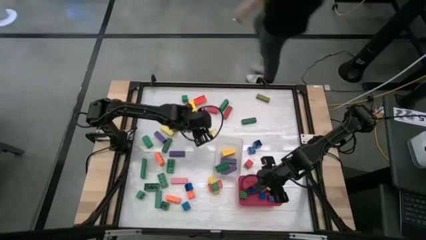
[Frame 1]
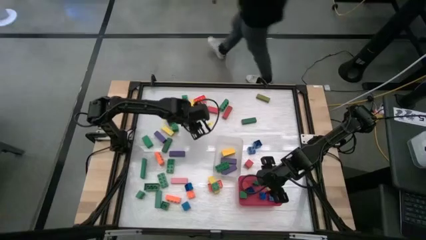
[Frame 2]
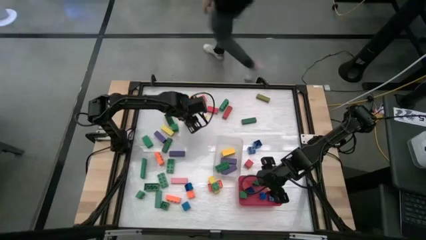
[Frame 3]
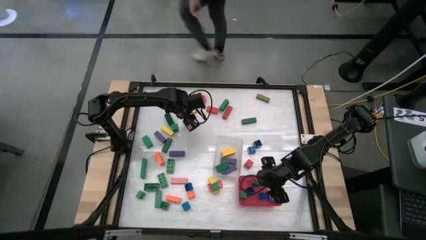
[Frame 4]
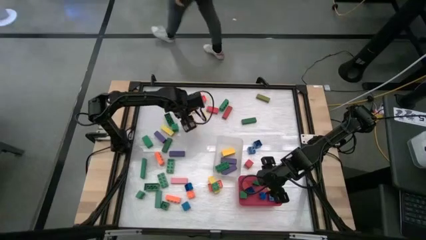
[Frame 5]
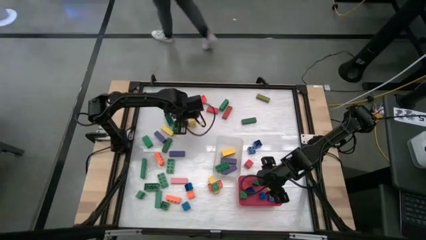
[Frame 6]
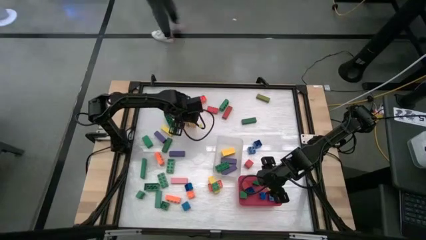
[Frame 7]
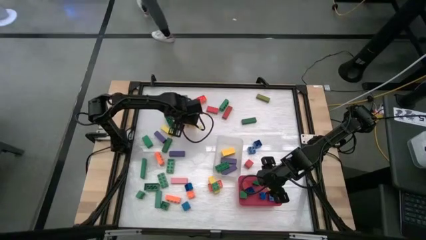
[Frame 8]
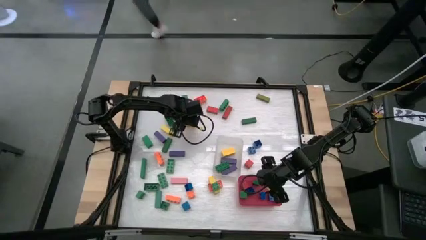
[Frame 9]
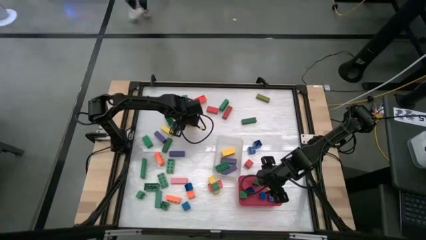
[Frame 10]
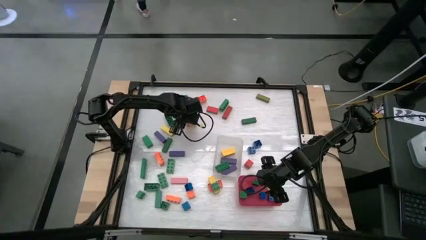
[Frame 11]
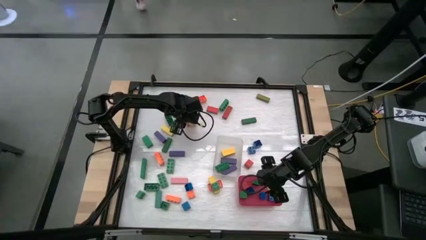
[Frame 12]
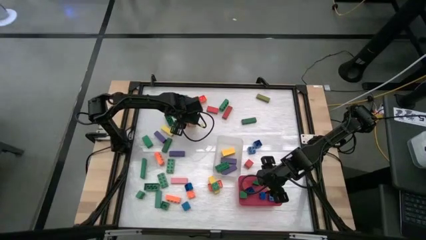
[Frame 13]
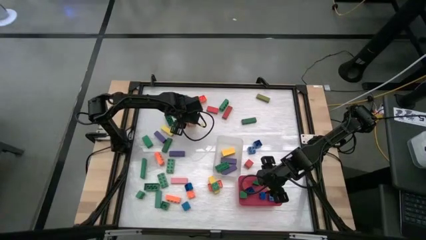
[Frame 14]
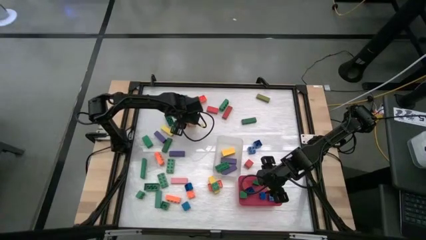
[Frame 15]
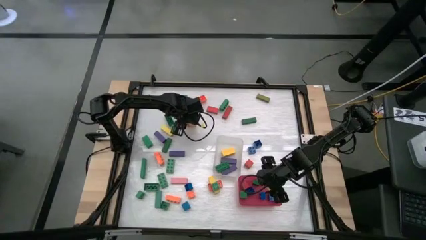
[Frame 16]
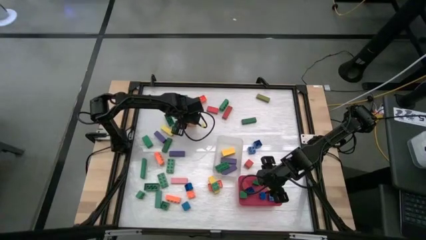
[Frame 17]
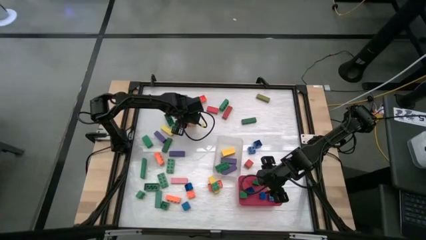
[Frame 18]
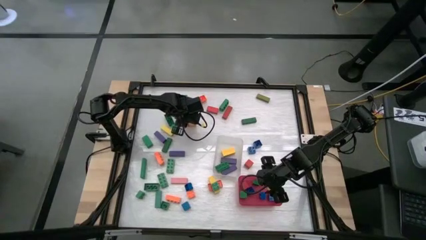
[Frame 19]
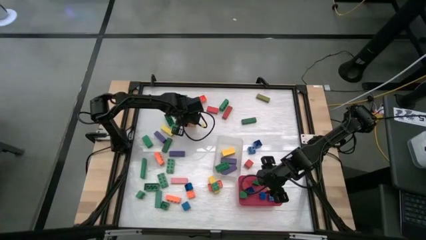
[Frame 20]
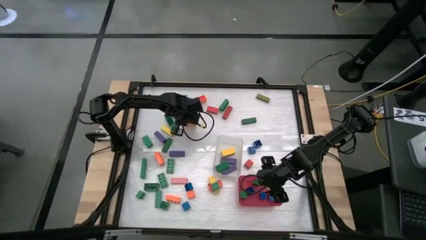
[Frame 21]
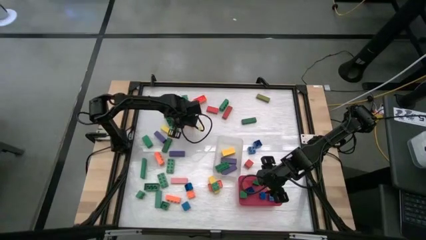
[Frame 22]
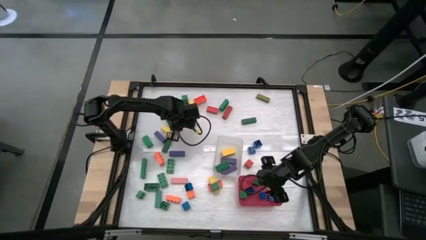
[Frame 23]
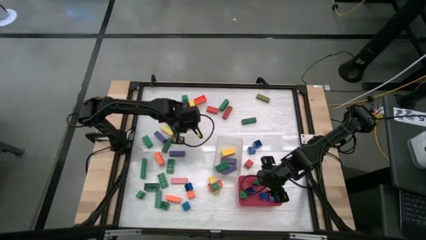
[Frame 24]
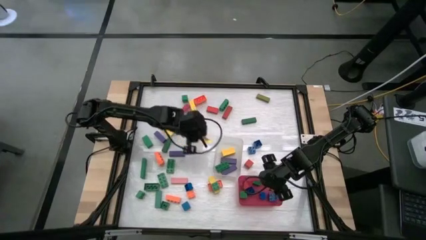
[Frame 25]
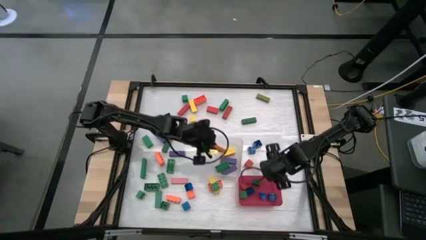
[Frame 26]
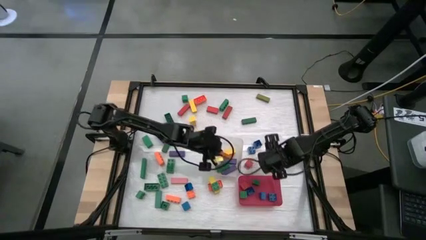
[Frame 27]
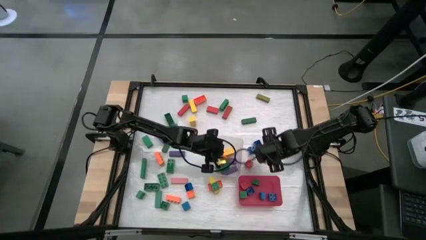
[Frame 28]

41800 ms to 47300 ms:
Task: Sort blocks by size
Put the orange rectangular block into the transparent bin

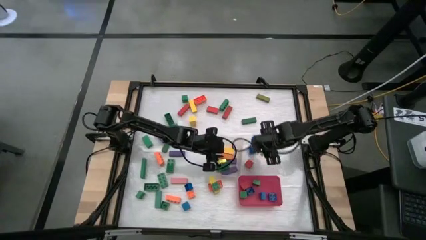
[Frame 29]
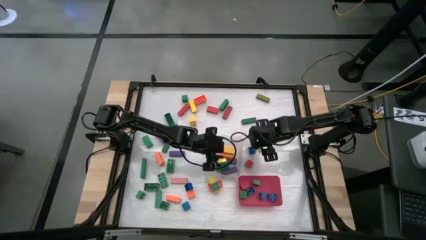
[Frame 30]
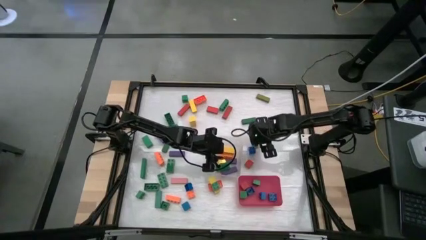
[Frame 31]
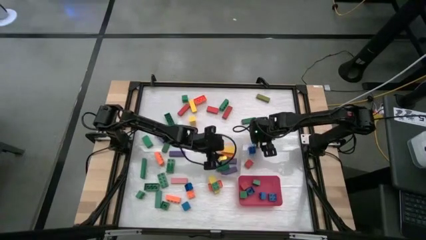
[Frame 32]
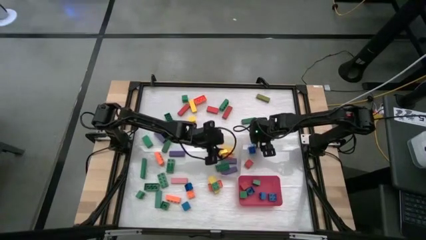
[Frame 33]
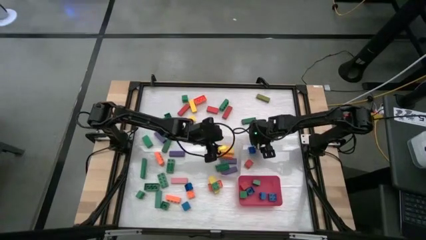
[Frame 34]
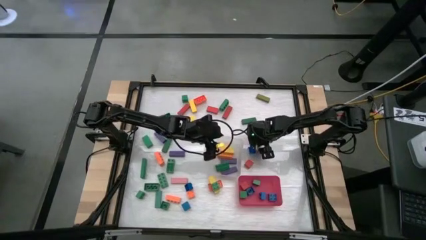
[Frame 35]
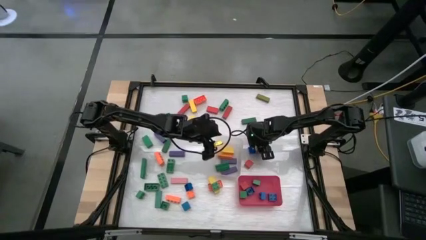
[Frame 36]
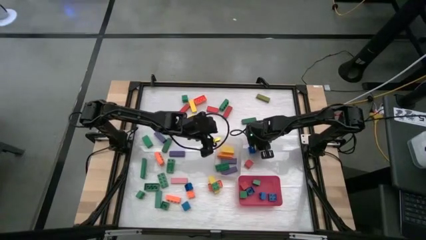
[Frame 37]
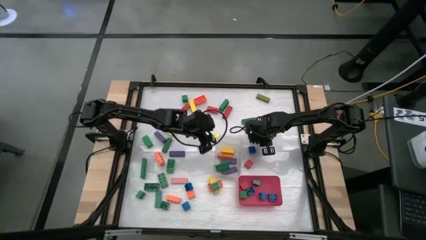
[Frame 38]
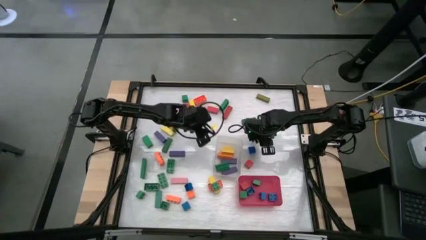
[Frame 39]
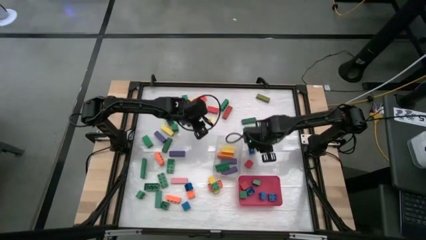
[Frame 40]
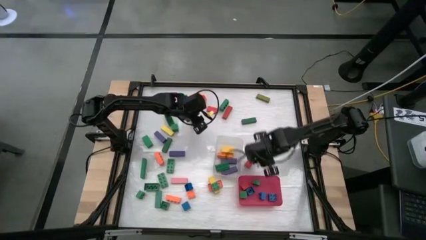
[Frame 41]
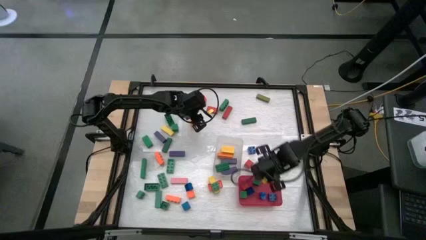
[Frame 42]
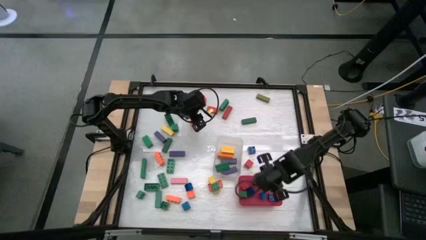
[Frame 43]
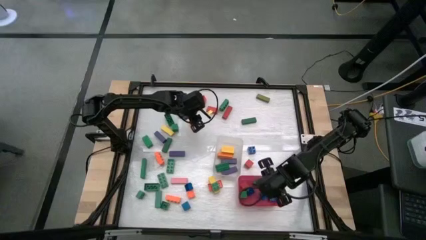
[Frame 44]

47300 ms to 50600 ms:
Put the blue square game piece into the red bin

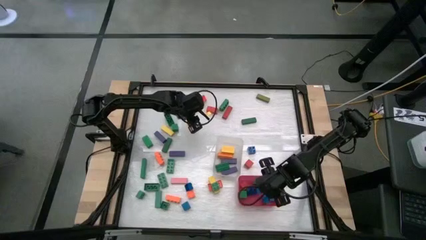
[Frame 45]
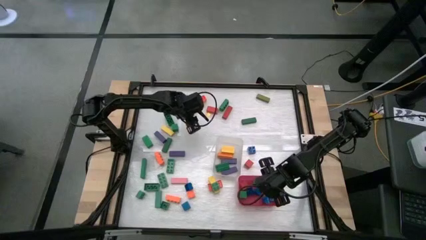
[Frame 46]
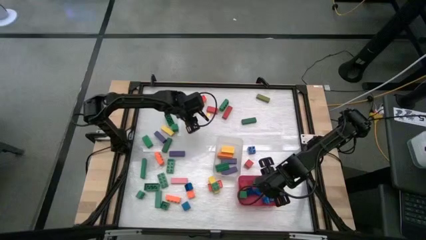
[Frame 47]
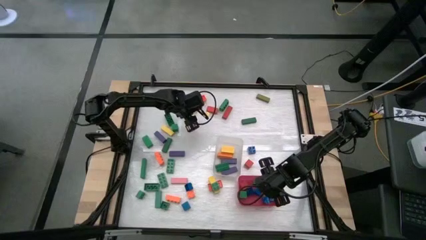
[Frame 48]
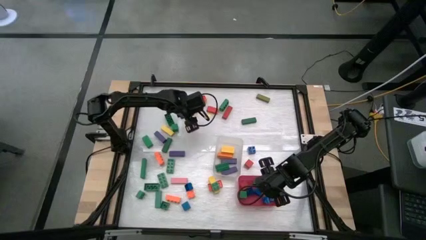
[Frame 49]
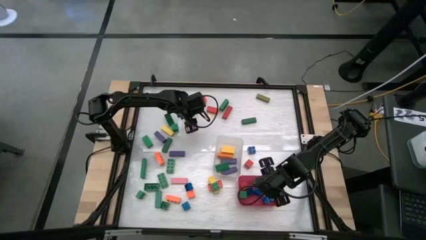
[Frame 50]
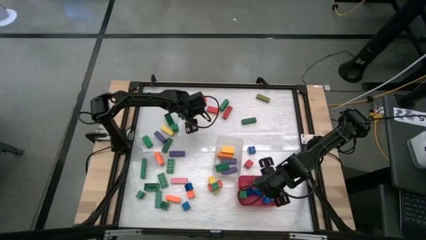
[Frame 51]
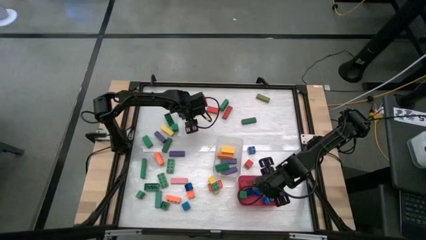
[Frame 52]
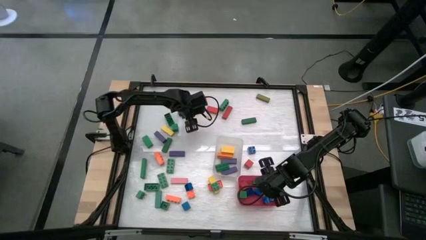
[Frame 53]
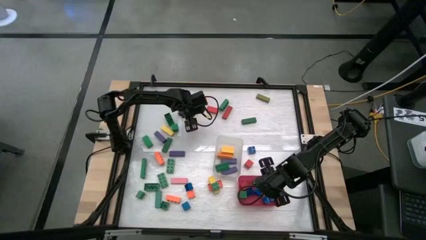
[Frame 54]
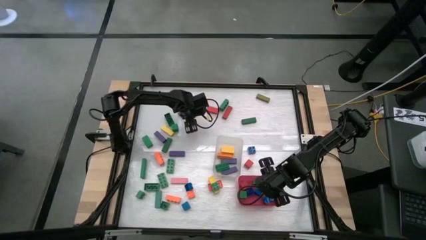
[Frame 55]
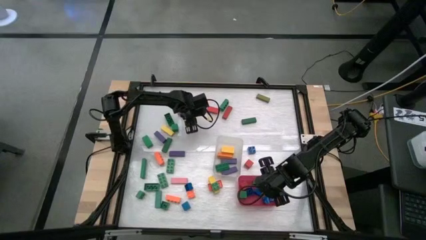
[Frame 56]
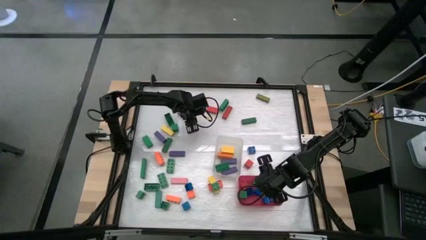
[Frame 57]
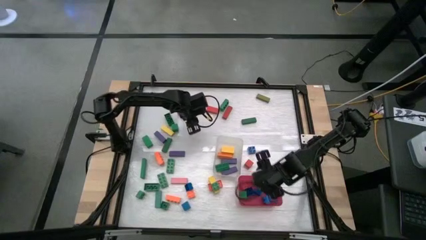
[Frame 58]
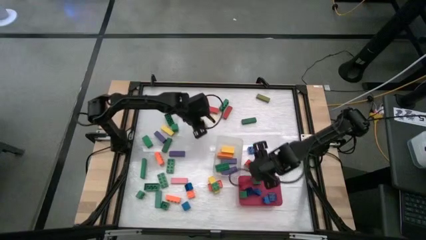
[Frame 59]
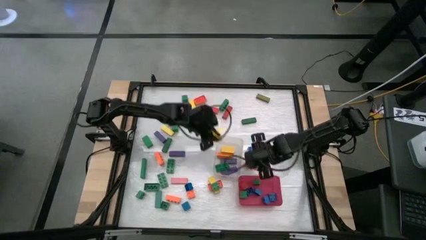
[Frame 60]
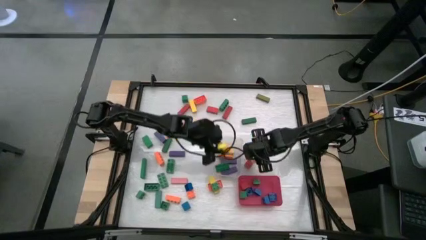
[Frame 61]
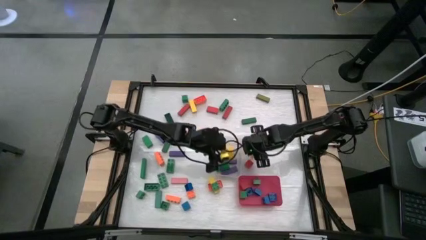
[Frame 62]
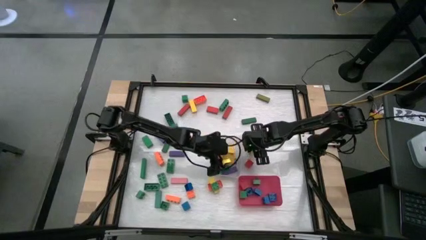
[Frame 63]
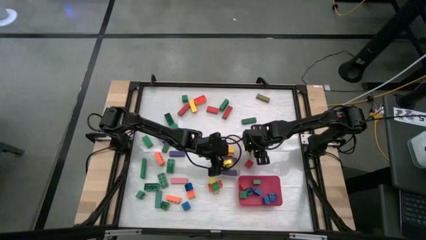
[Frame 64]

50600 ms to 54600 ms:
Put the yellow rectangular block into the transparent bin

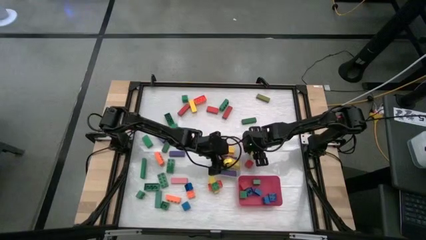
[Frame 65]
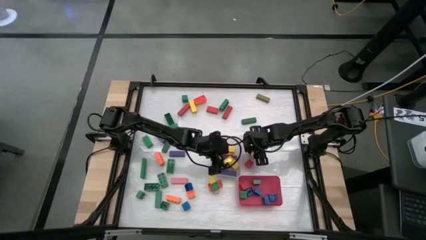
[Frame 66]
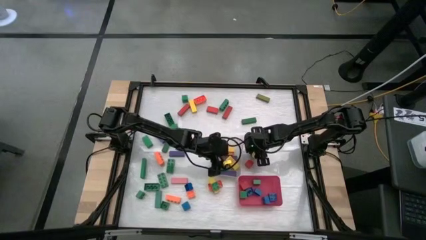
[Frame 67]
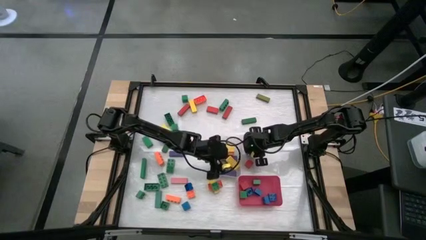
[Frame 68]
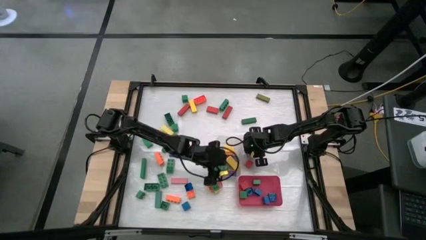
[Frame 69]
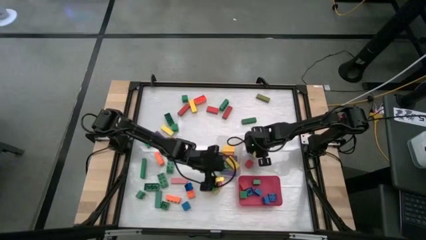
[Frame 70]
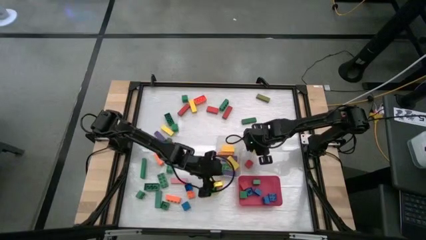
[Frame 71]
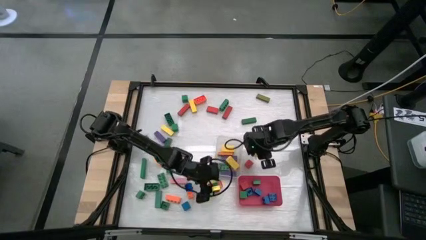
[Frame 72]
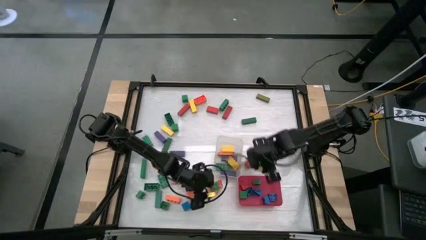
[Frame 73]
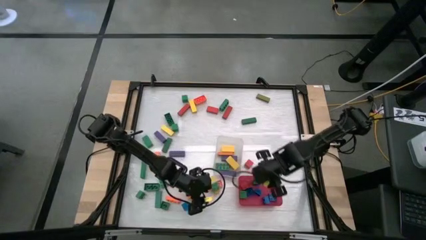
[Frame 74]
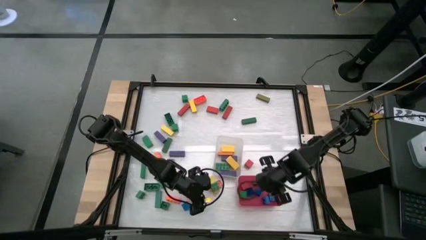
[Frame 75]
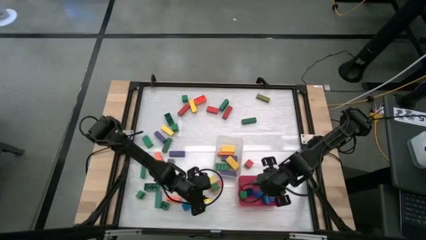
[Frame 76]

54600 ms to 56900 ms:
Put the blue square game piece into the red bin

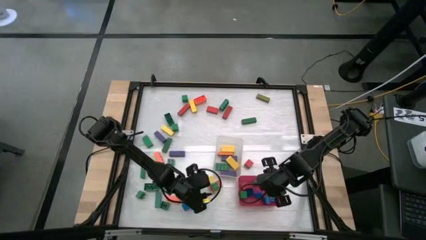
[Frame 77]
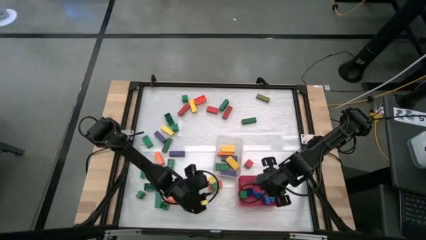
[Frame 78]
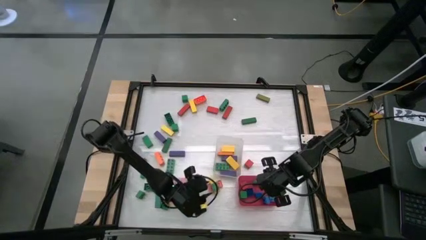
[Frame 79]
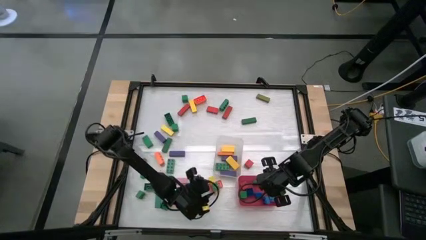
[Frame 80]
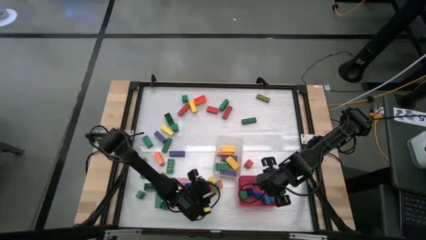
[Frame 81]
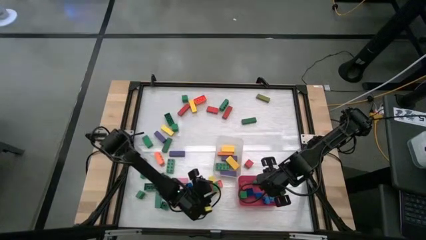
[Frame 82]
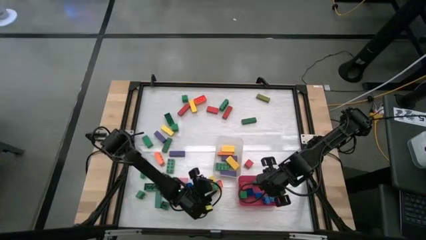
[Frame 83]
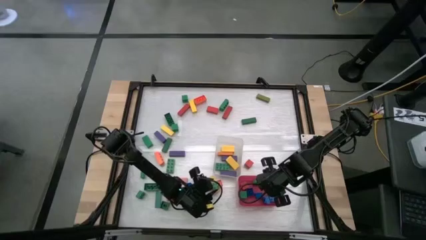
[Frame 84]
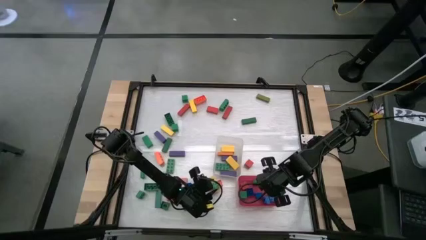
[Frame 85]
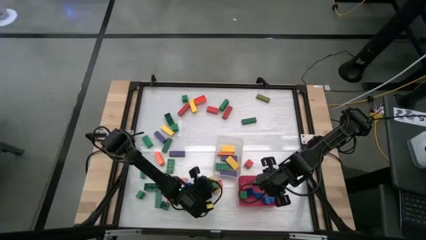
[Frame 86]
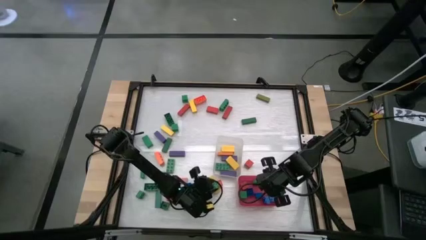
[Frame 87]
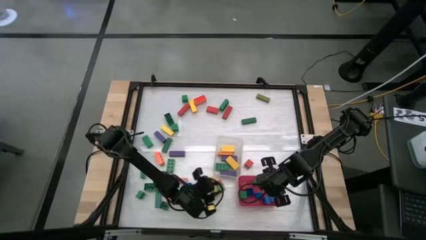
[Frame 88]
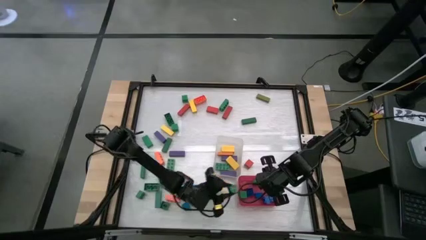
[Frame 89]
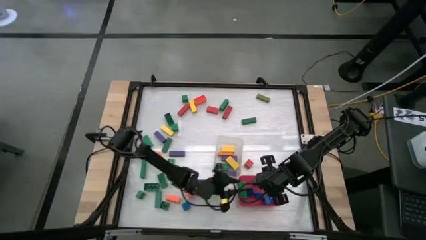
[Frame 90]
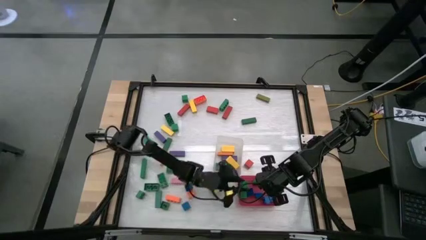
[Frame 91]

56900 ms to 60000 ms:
Put the green square game piece into the red bin
